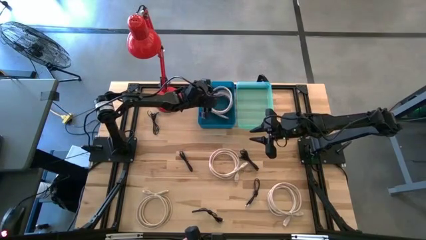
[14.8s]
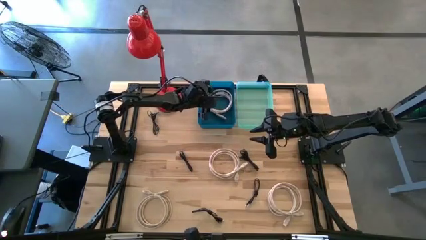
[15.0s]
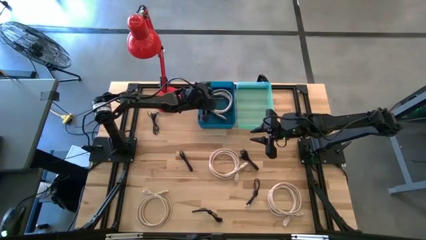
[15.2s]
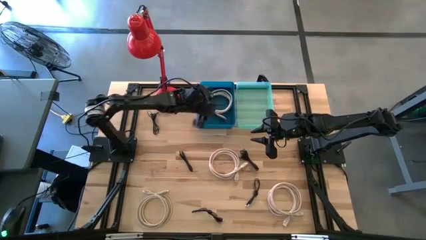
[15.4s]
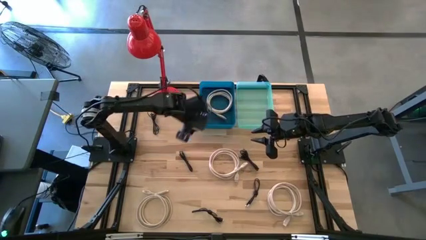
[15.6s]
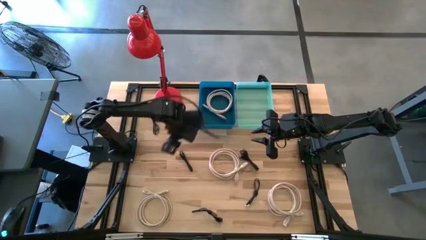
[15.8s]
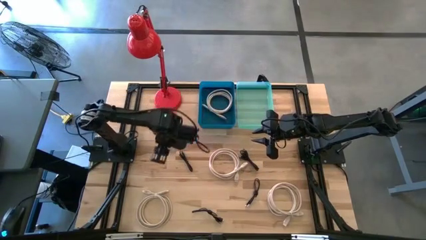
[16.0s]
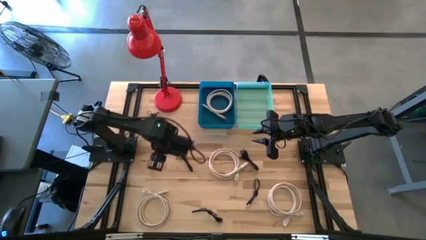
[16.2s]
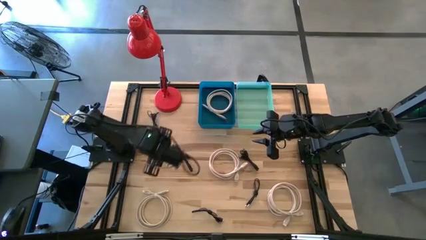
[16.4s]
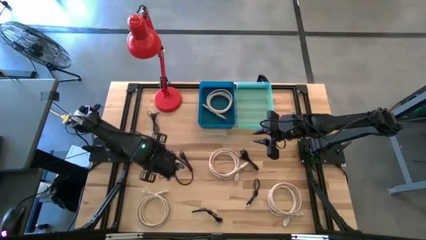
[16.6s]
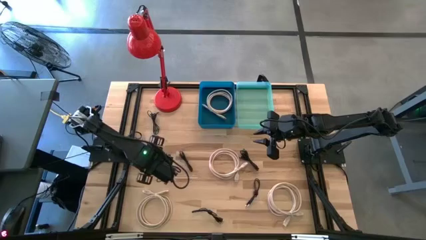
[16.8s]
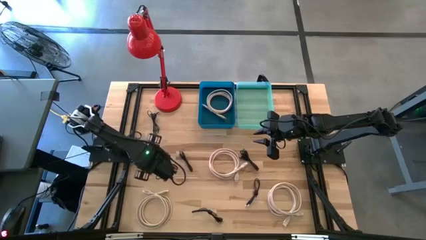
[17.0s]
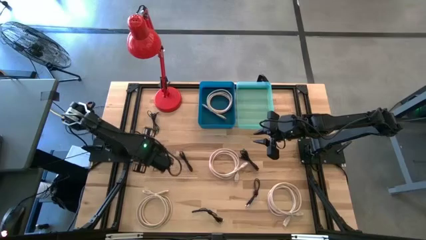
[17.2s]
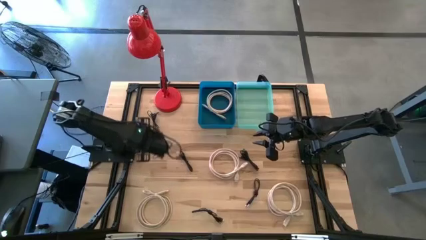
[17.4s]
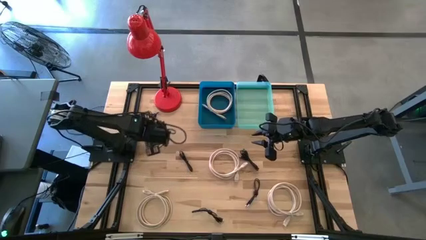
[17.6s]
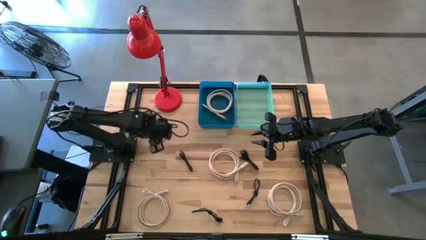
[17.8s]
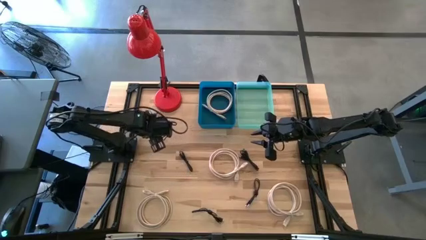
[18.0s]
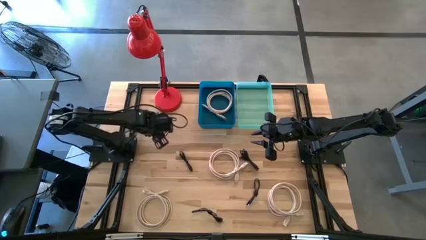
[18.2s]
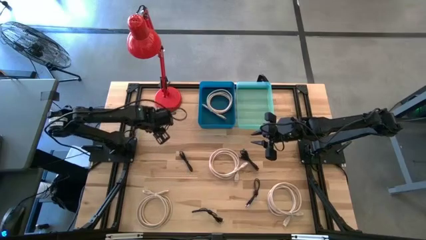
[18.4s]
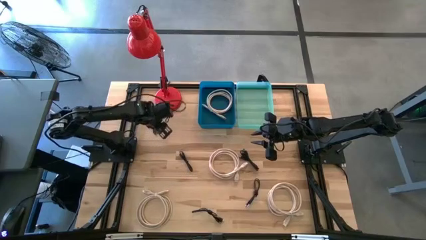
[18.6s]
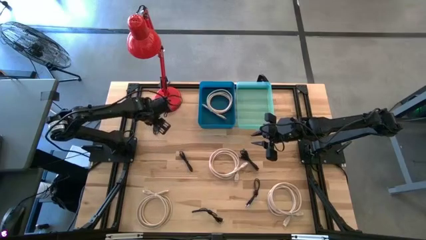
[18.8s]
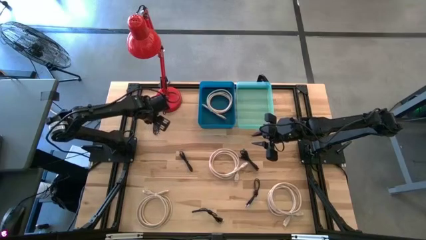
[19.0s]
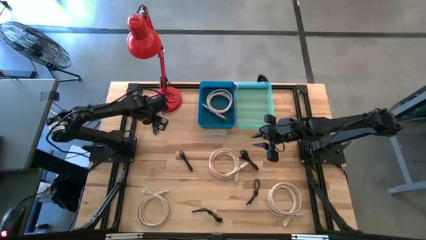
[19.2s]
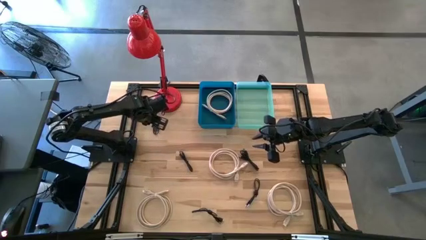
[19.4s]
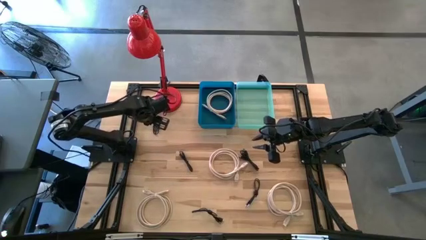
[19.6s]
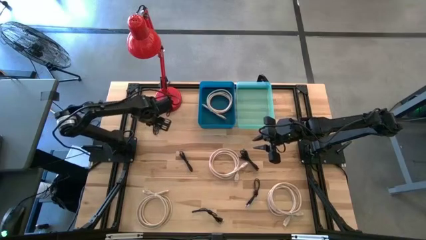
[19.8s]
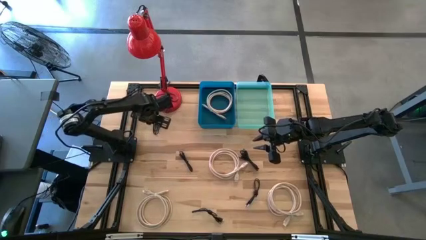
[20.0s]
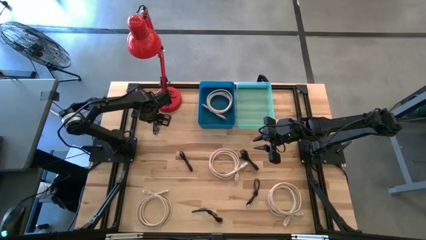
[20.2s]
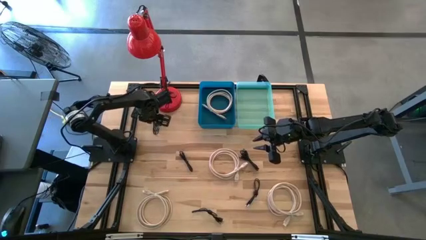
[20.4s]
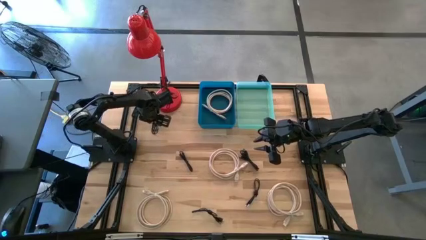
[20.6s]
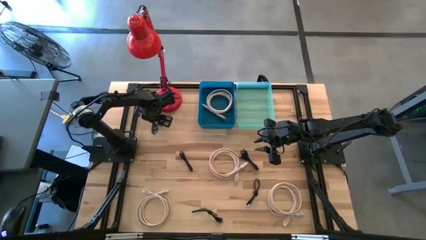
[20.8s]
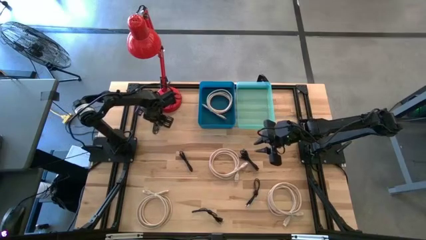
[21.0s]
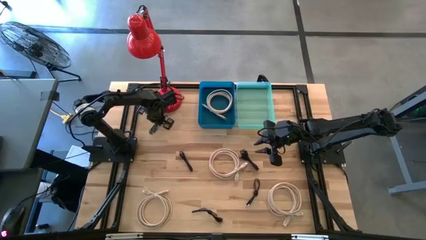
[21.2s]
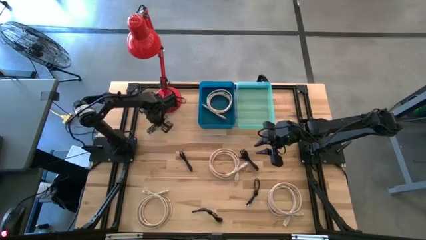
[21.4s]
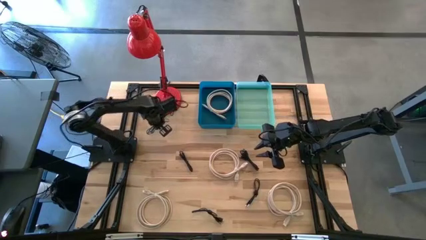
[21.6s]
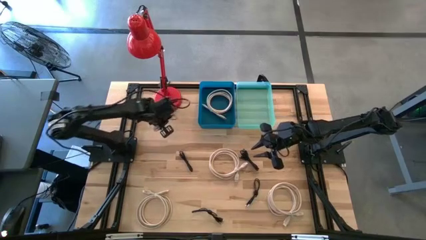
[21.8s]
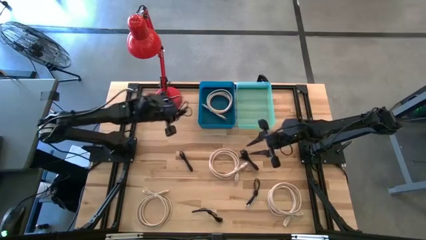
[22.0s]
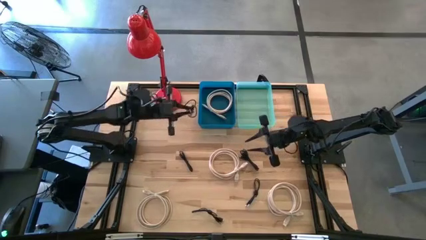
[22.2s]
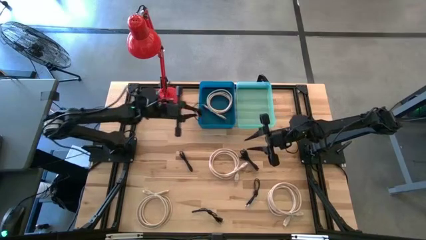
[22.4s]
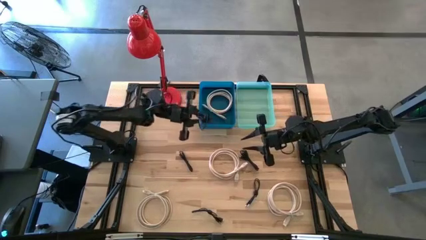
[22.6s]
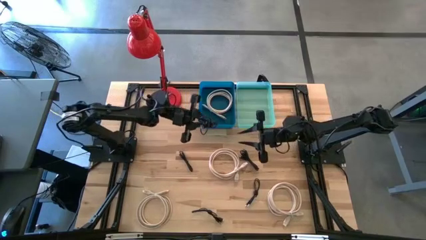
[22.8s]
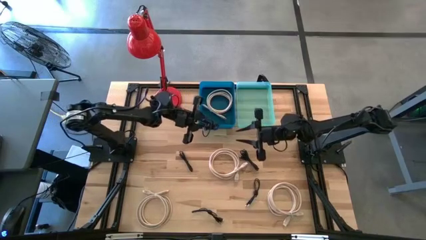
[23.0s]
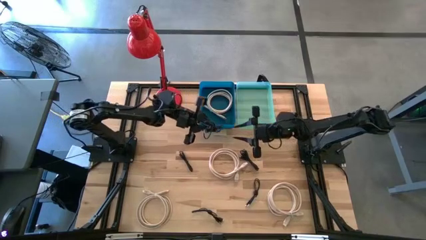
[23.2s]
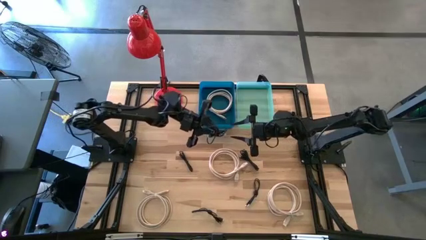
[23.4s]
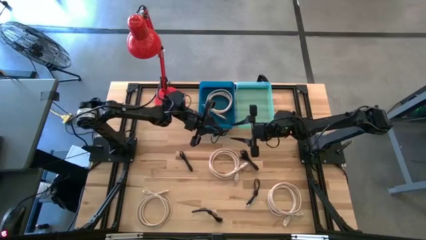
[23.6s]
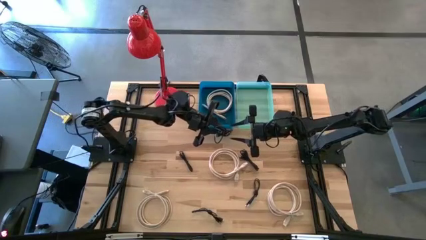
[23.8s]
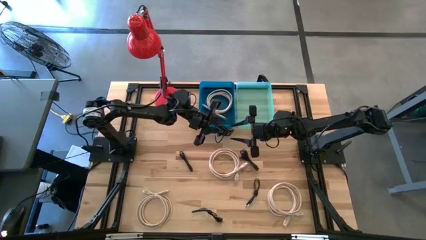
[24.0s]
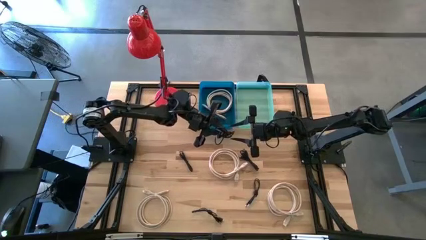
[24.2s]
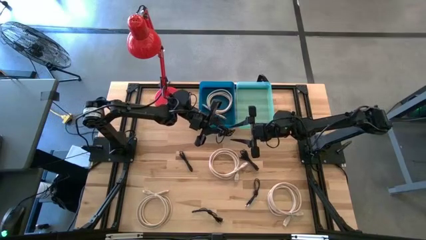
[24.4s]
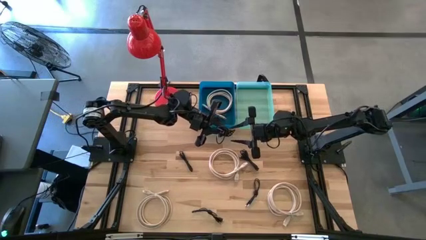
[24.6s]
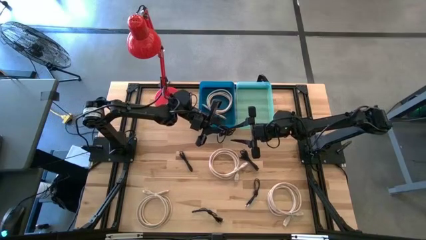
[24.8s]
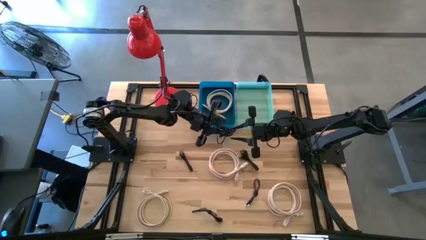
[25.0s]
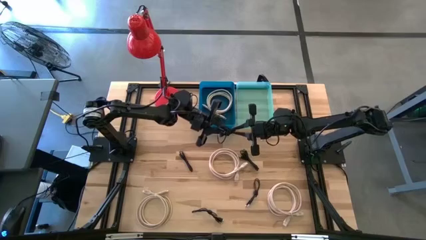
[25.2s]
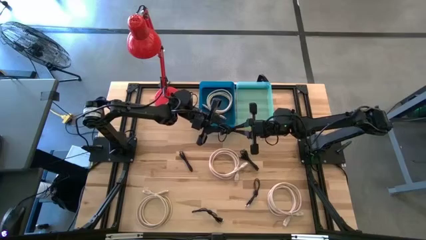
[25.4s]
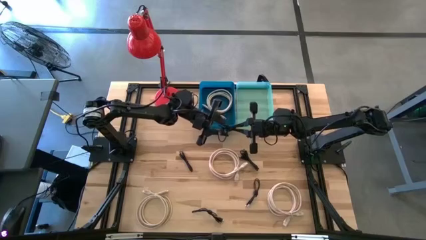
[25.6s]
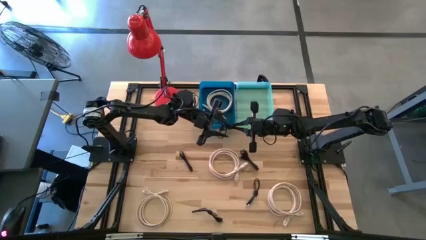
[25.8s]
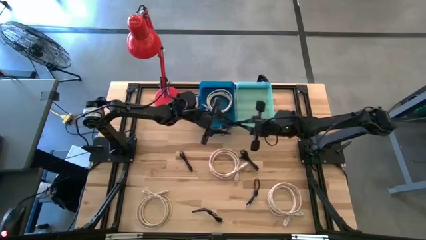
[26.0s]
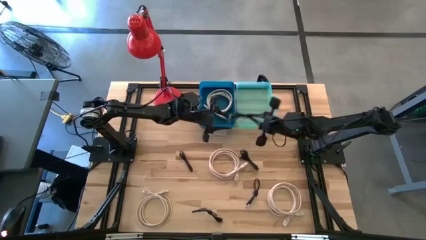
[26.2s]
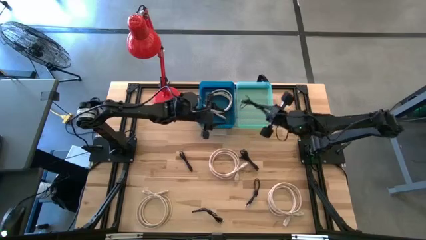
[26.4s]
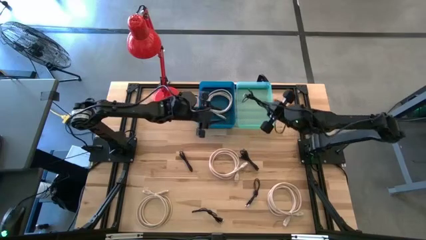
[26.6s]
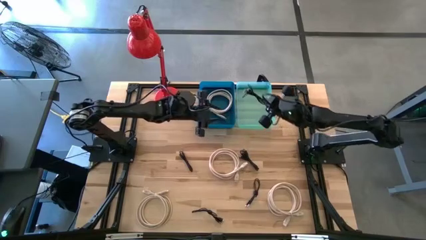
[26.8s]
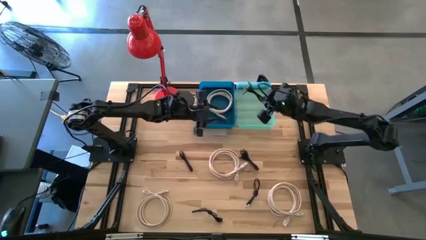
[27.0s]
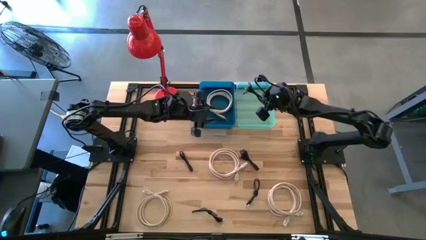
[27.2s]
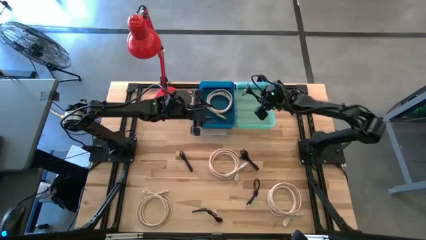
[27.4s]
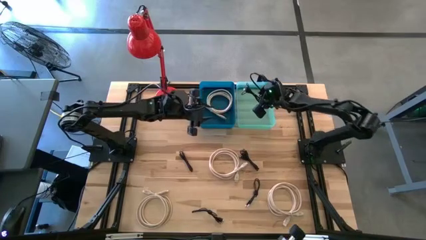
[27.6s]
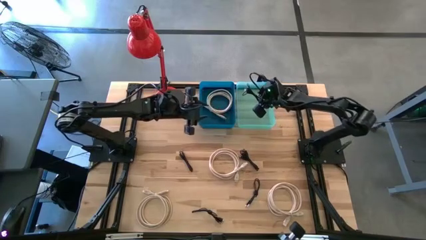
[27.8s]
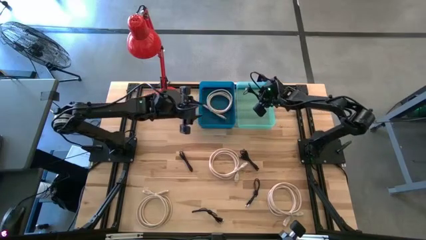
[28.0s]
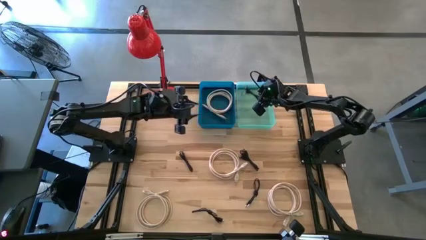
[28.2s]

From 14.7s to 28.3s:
Task: Pick & Place USB Port
Put the black charger cable into the green bin
